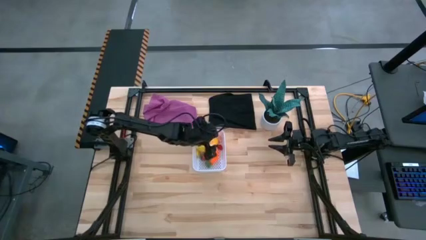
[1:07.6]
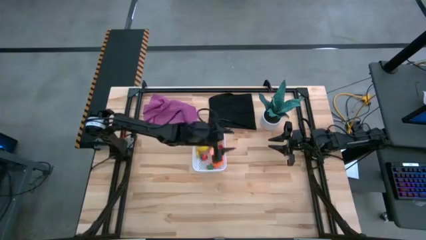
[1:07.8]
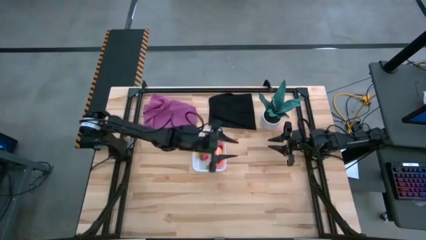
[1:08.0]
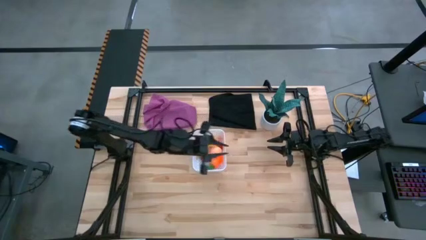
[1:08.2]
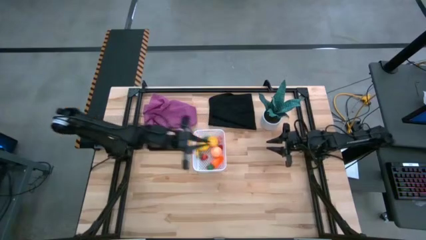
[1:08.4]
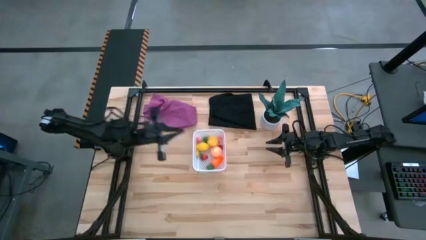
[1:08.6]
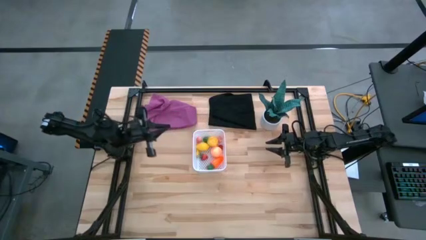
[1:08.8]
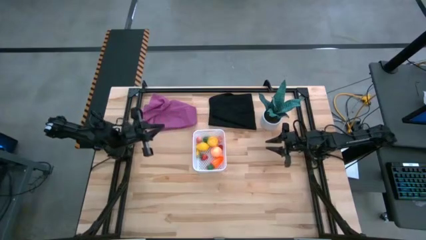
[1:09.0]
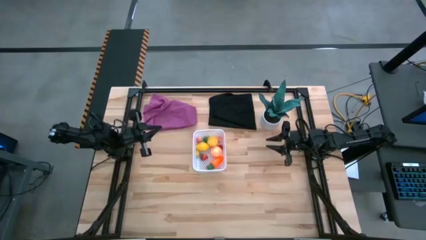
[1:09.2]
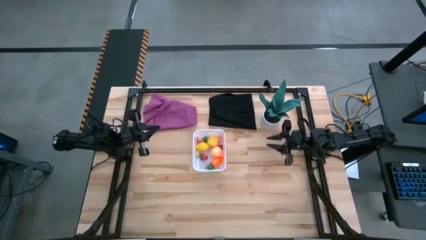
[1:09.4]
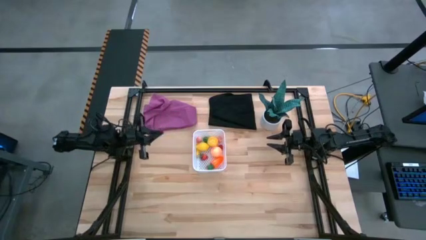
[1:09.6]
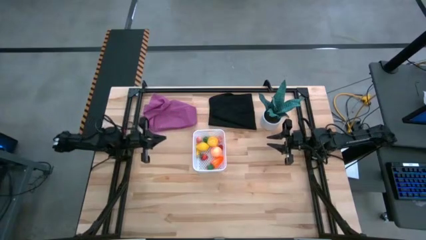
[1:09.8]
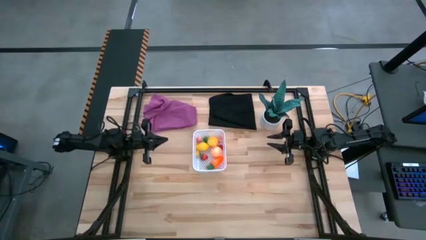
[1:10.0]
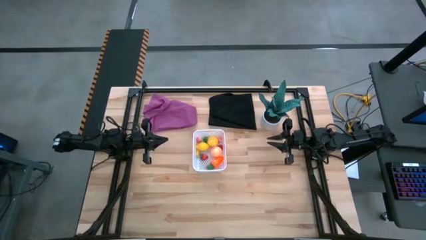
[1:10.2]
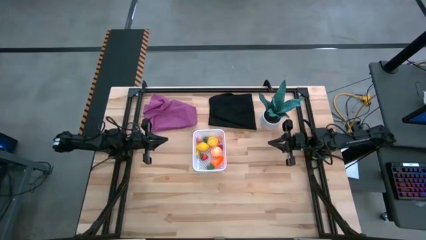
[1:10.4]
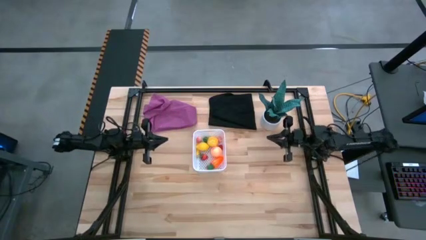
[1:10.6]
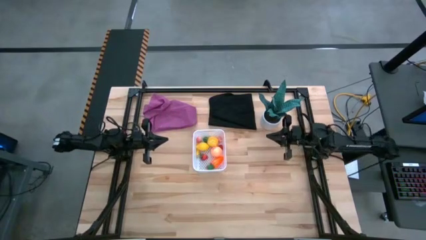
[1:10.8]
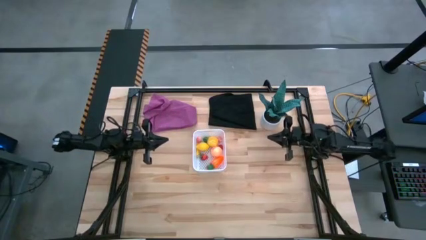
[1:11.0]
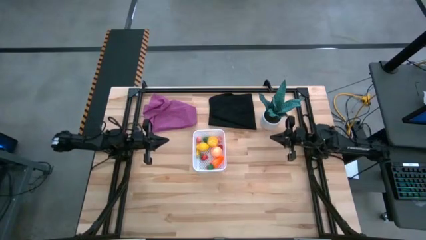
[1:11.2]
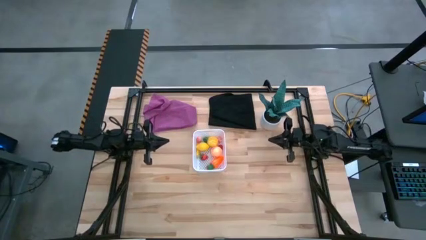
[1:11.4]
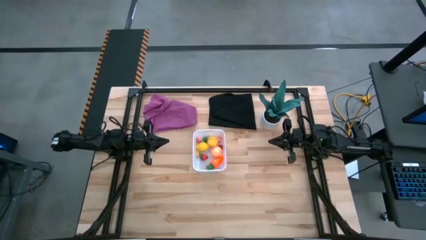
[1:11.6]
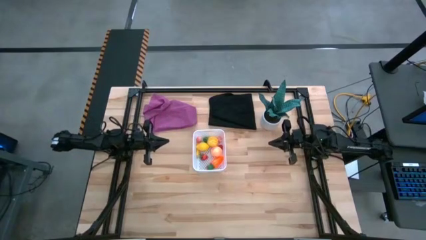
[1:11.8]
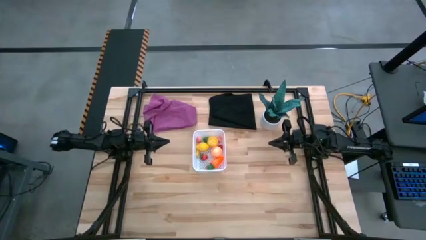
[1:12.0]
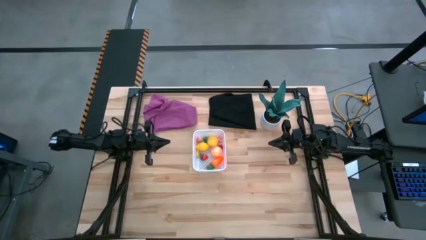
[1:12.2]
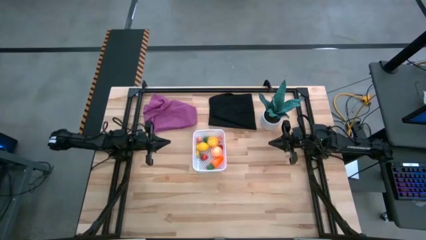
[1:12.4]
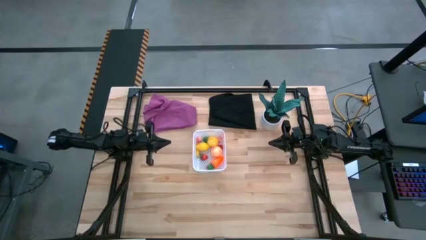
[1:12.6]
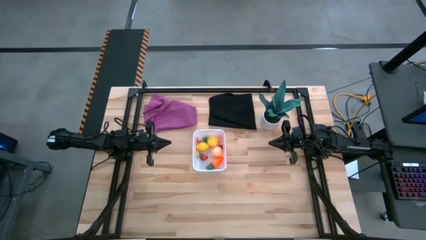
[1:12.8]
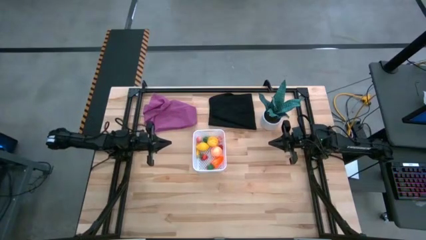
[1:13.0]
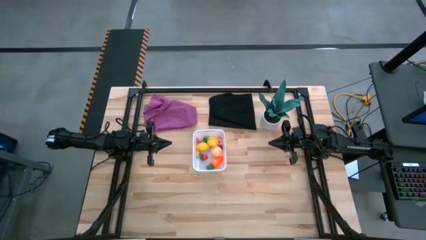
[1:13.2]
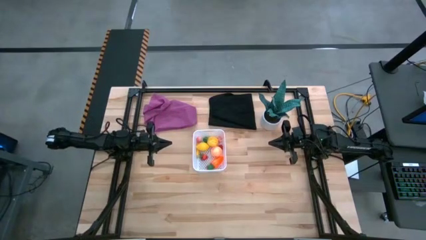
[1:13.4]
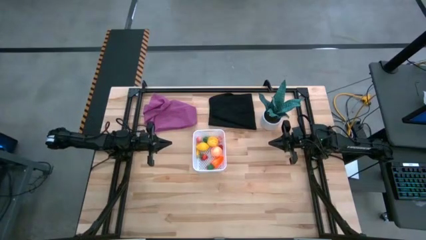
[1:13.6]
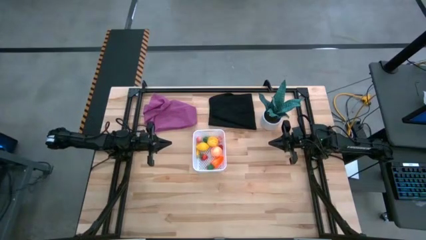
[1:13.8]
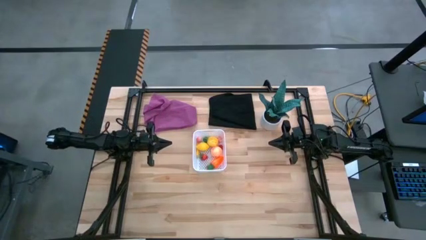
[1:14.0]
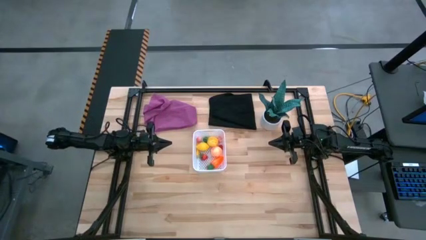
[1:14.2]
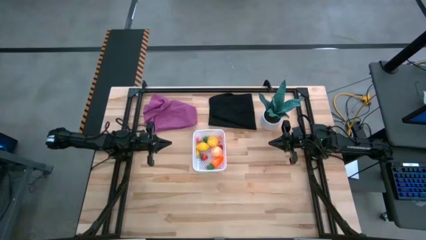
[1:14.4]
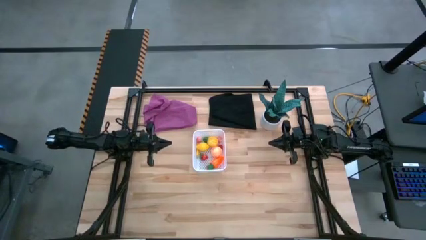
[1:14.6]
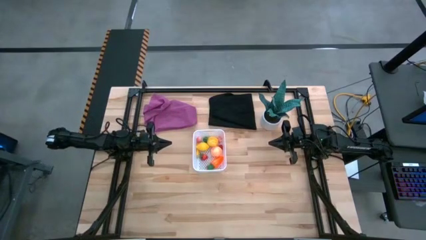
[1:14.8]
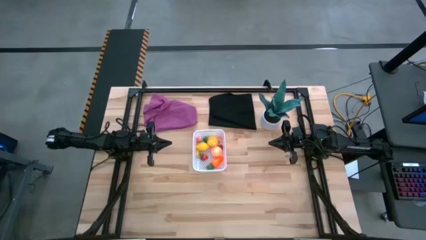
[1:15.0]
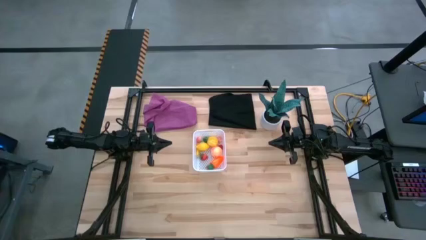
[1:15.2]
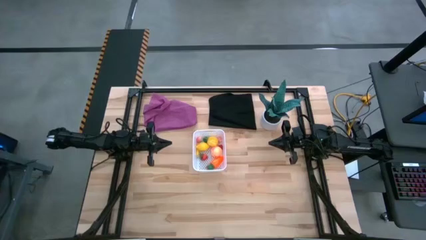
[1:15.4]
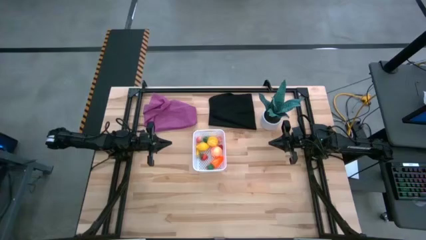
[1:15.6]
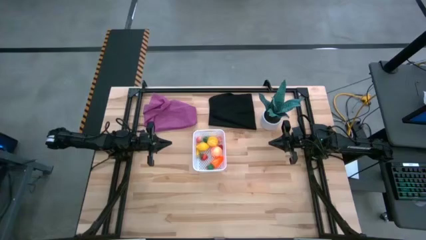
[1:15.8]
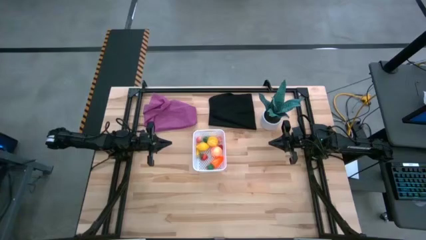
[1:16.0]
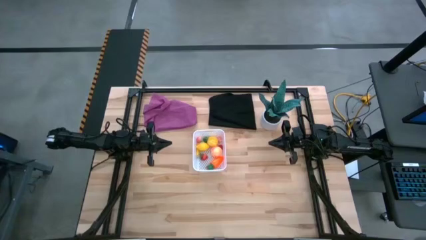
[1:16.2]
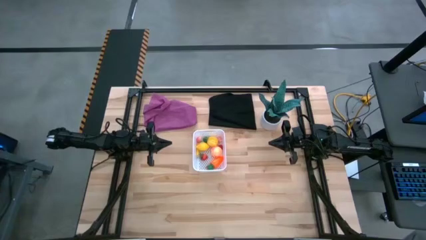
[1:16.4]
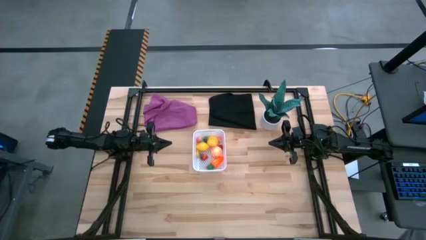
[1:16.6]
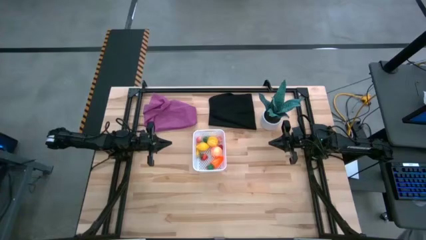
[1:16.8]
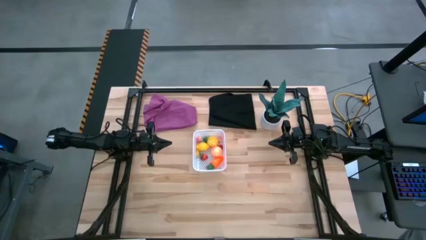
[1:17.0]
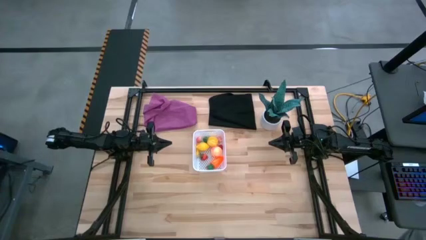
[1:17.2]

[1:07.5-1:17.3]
Task: Pick and placing Produce into tupperware
Return to Home Position

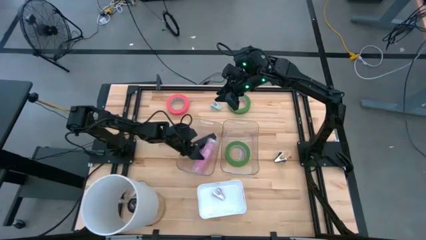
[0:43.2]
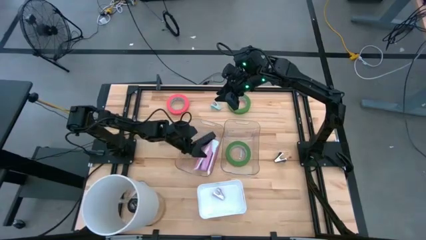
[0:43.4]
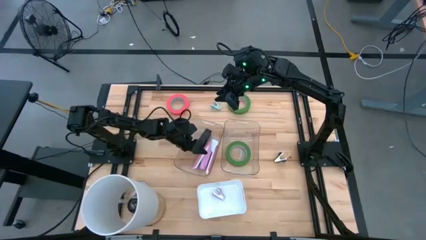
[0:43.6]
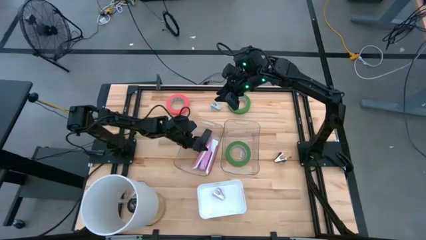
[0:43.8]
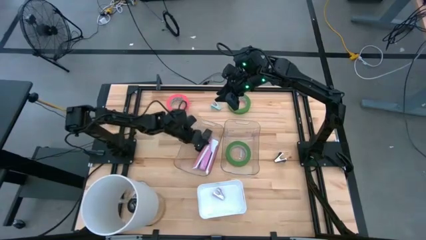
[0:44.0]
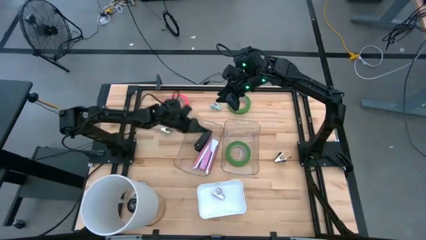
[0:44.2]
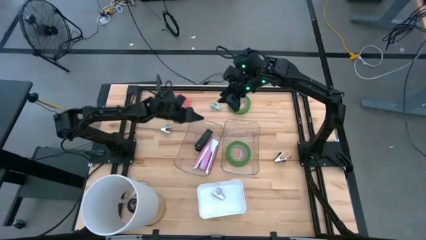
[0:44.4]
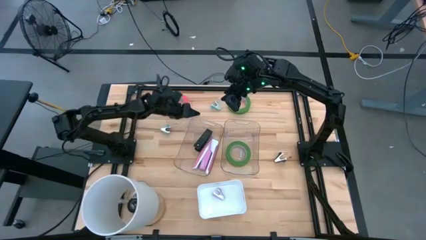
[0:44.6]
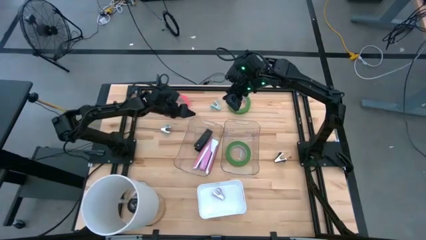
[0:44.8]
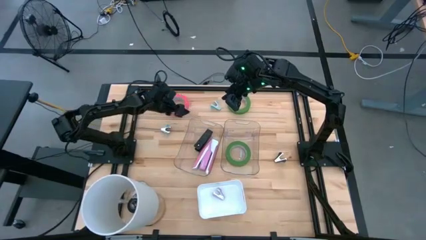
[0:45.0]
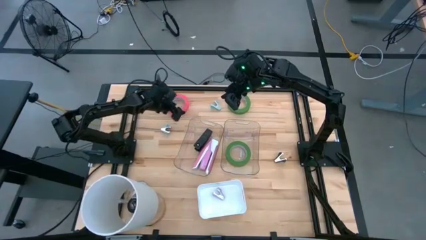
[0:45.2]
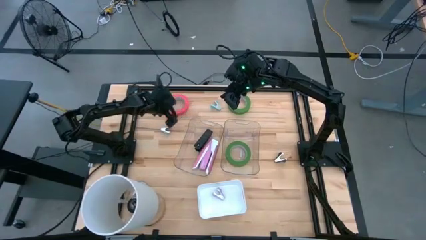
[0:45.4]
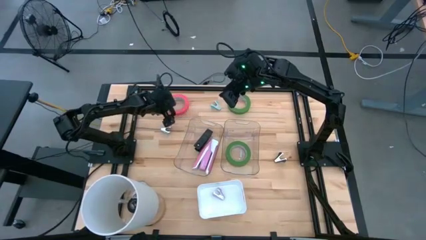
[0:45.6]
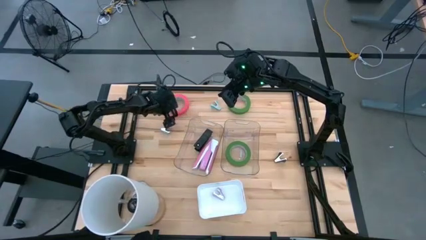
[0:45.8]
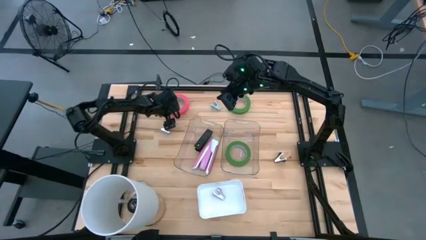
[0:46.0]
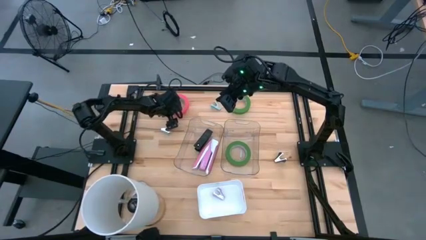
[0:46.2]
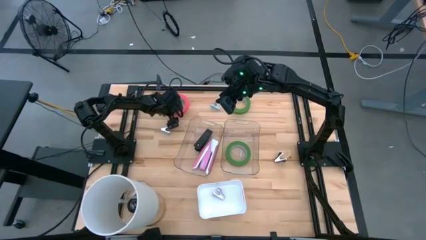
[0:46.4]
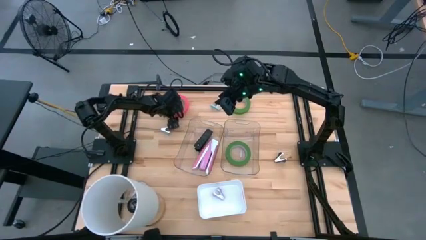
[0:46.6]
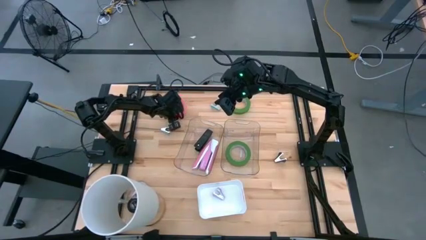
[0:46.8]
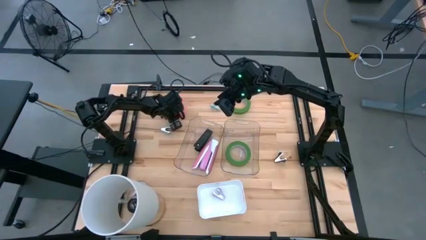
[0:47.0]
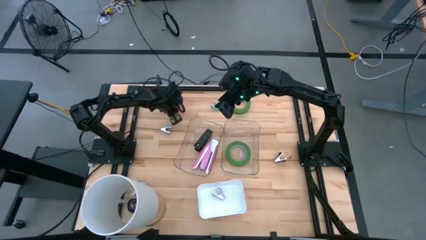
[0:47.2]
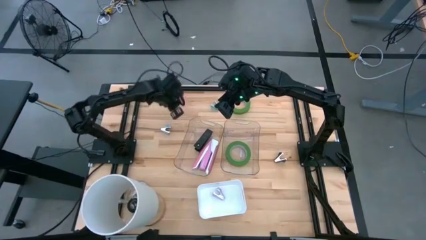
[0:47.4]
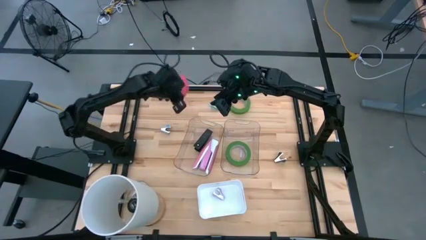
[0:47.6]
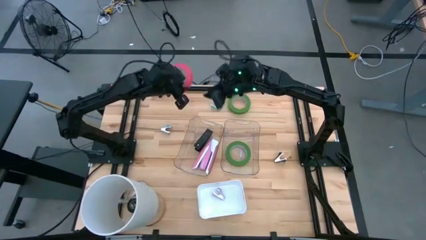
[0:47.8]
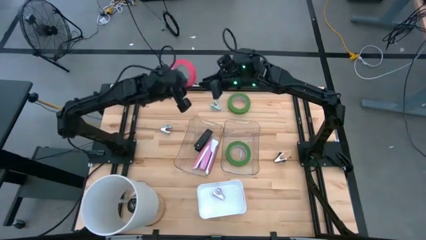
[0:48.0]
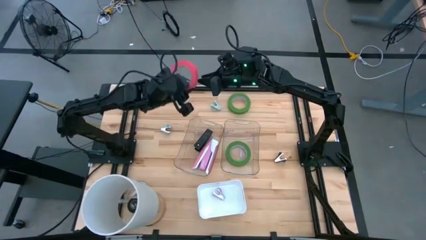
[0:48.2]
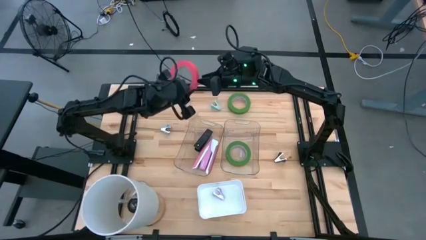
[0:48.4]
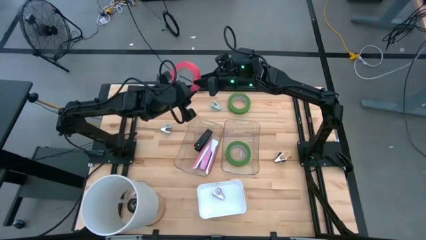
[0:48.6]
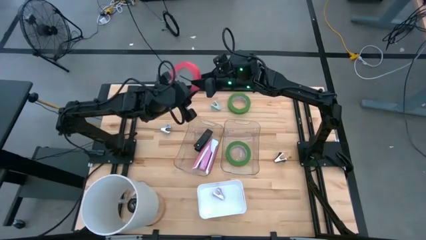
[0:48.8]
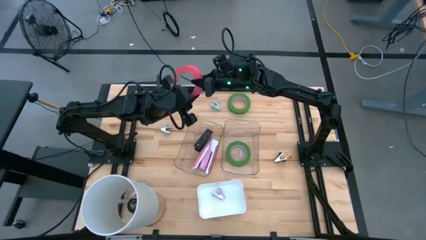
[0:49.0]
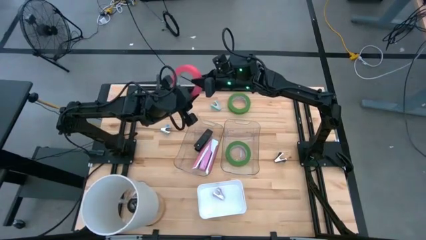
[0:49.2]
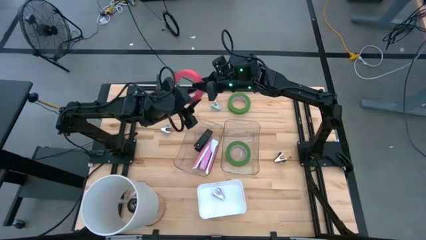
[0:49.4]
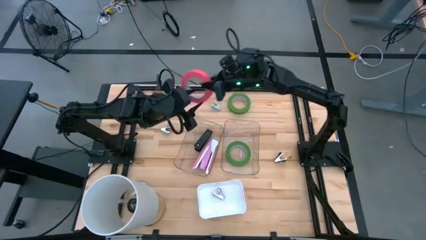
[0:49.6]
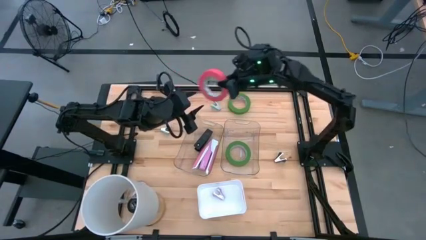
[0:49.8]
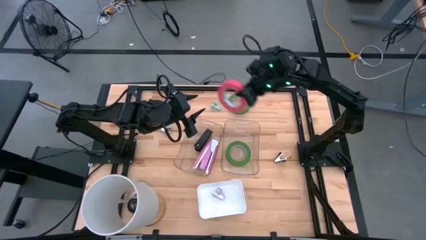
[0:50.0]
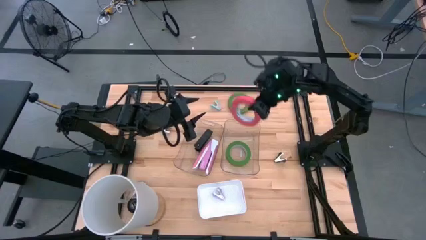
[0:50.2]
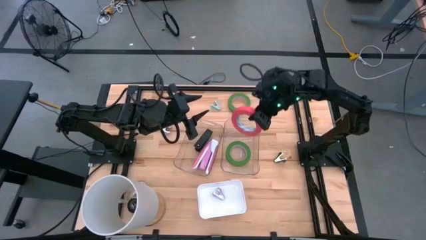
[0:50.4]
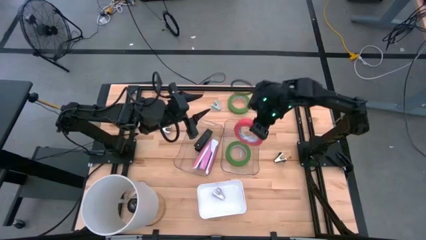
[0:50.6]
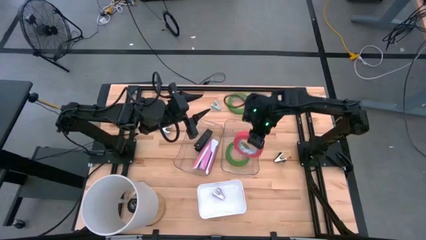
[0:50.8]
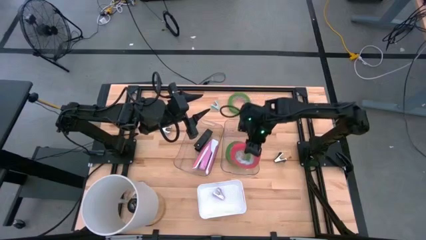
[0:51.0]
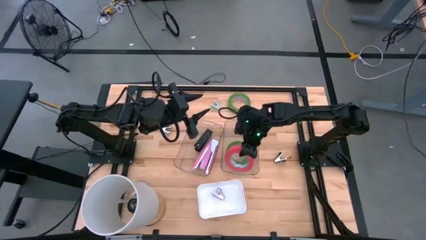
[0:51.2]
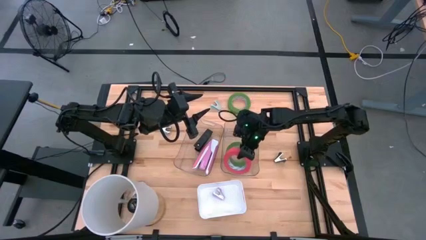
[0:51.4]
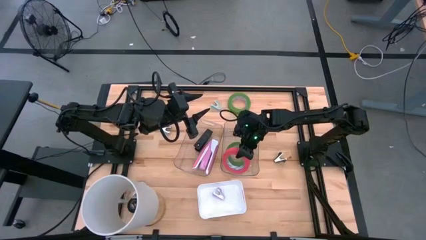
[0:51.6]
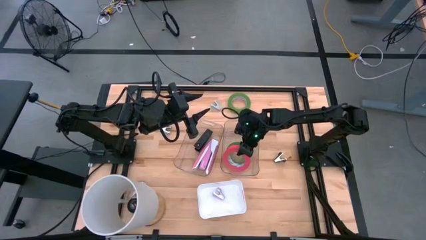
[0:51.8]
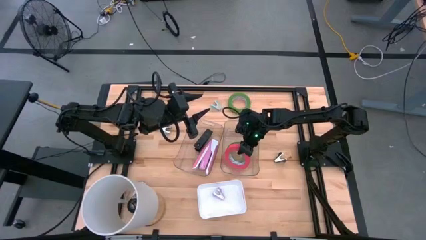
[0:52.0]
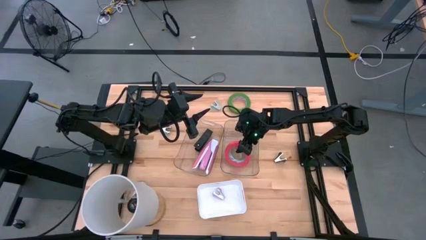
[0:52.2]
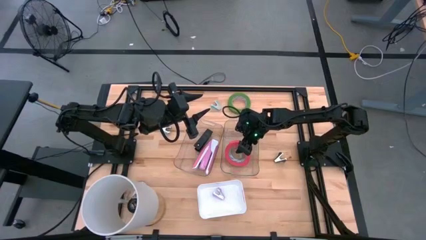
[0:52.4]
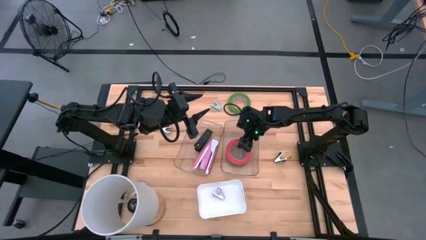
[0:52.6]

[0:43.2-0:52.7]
Task: Pick and place Stapler, Stapler remover, tape
Put the pink tape into the right transparent bin
